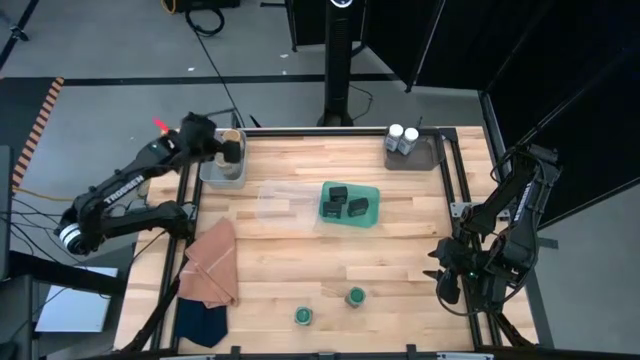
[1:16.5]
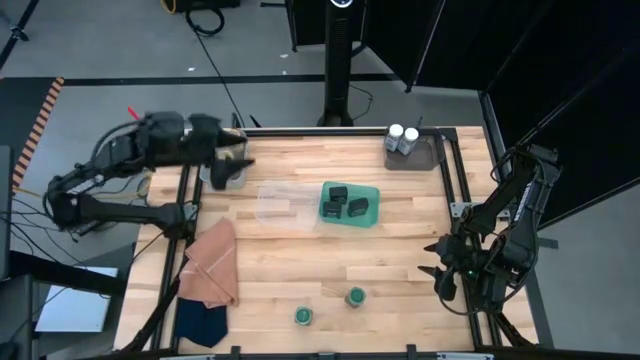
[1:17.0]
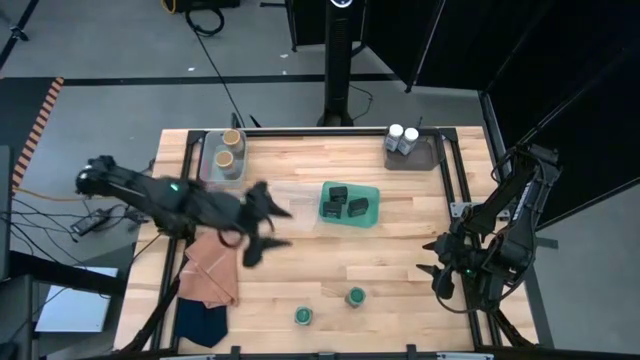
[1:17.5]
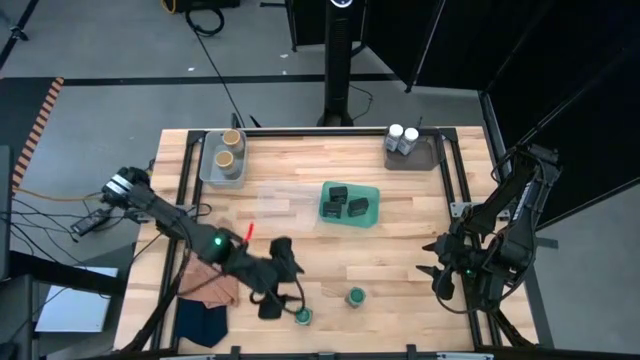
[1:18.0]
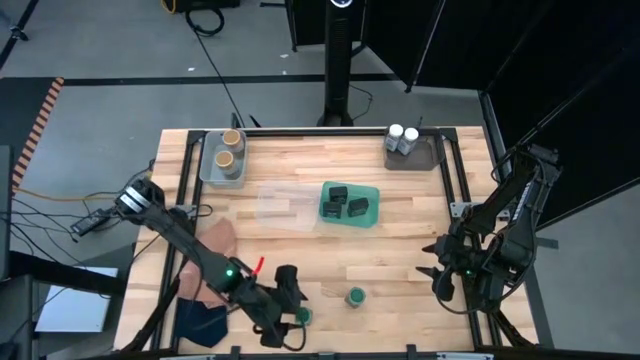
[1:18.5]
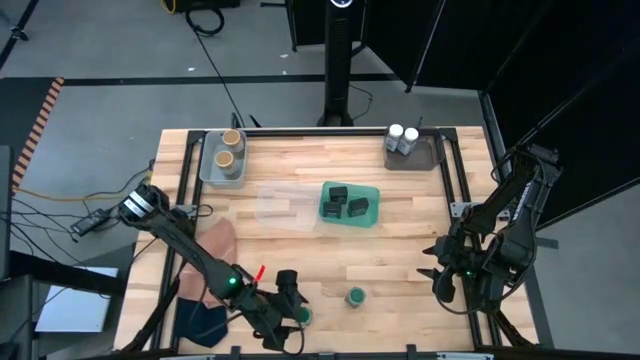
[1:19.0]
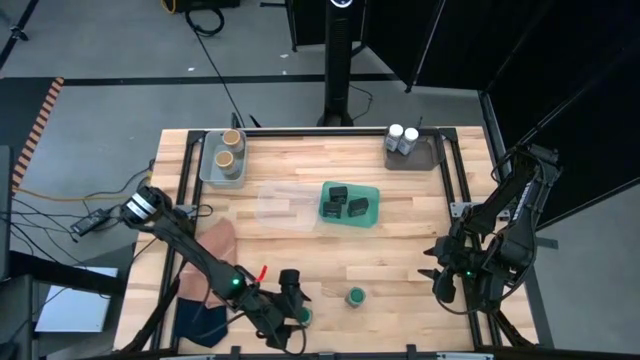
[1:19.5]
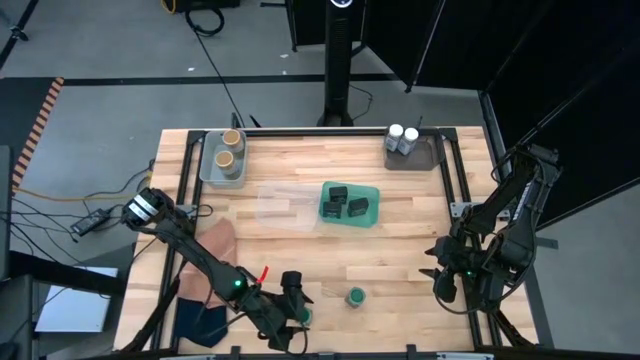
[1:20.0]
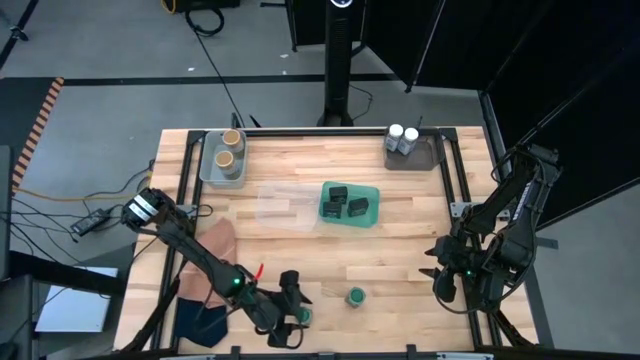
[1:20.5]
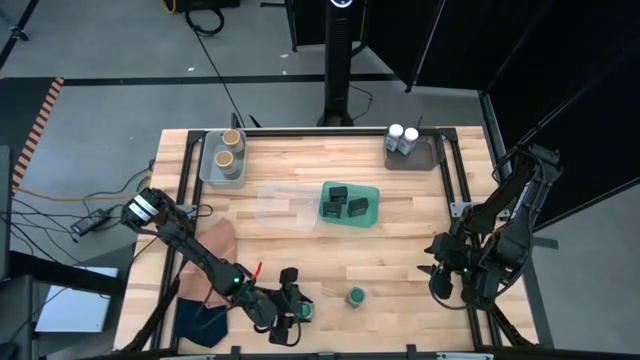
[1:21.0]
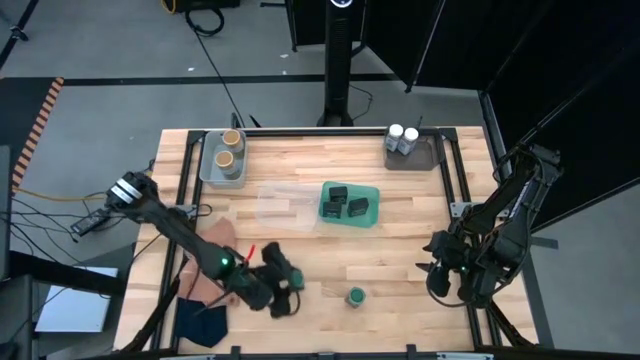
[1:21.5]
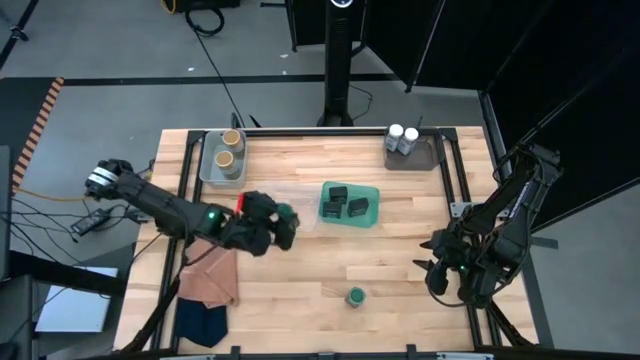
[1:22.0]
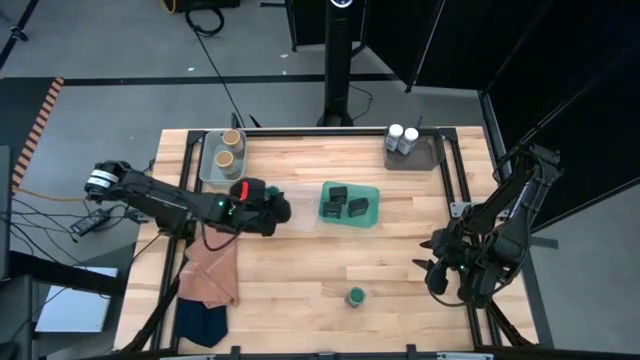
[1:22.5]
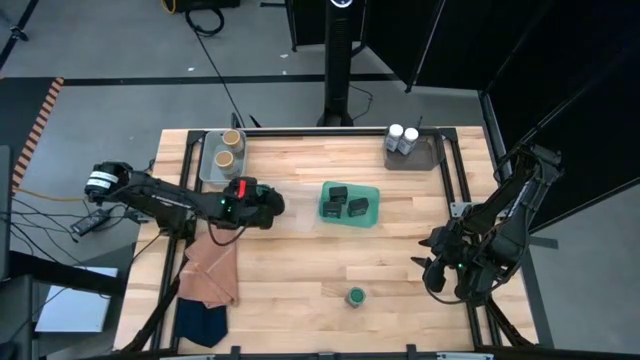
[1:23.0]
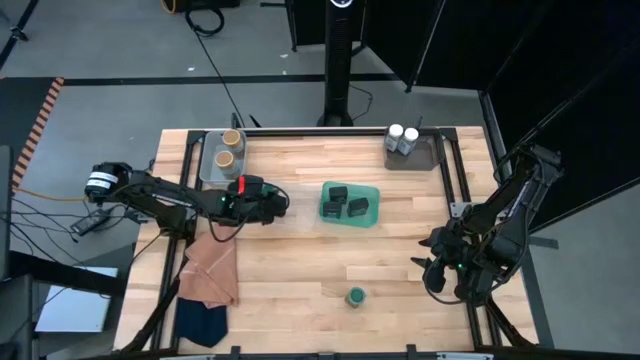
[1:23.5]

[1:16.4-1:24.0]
Task: Sort spices by type
Put the left green seasoning bottle into the transparent bin

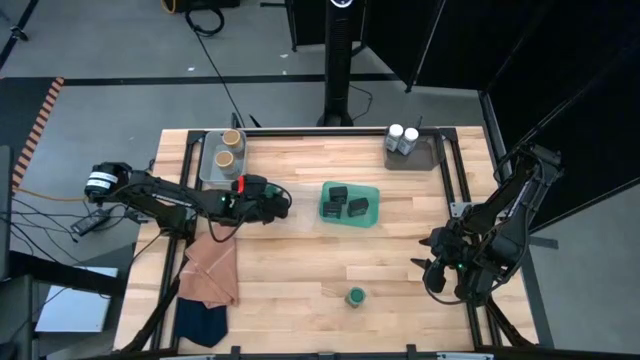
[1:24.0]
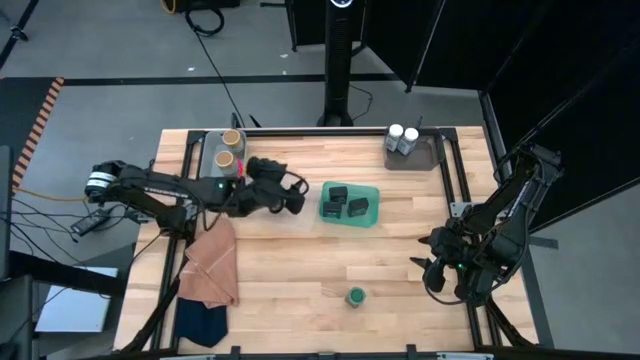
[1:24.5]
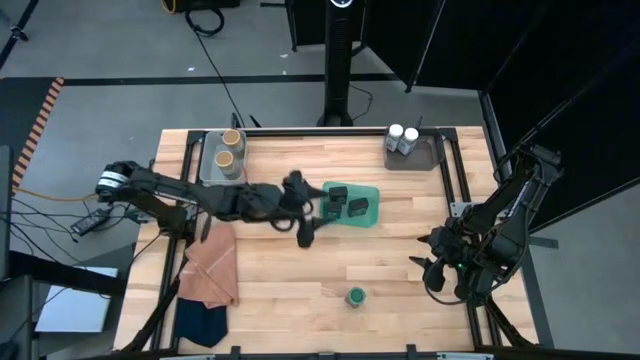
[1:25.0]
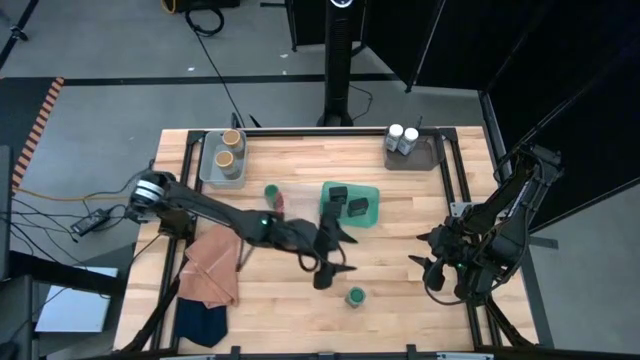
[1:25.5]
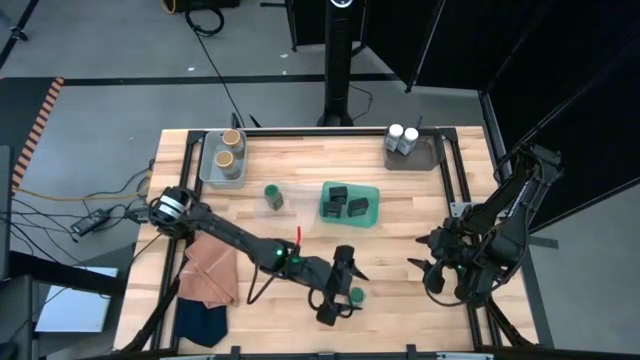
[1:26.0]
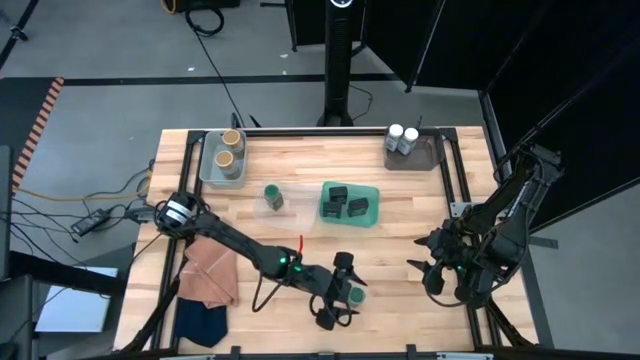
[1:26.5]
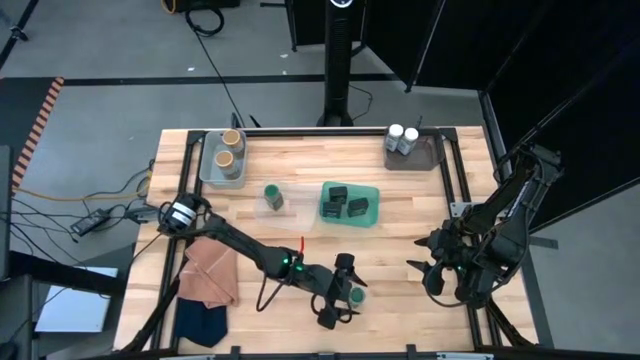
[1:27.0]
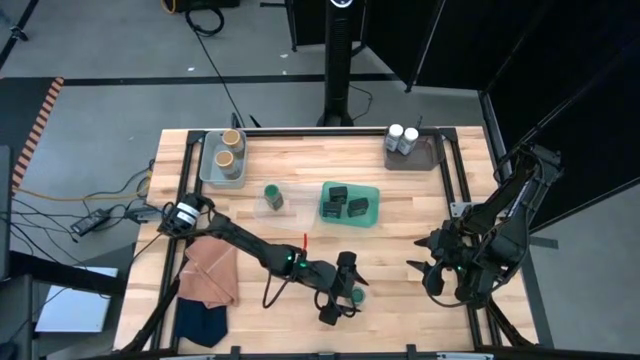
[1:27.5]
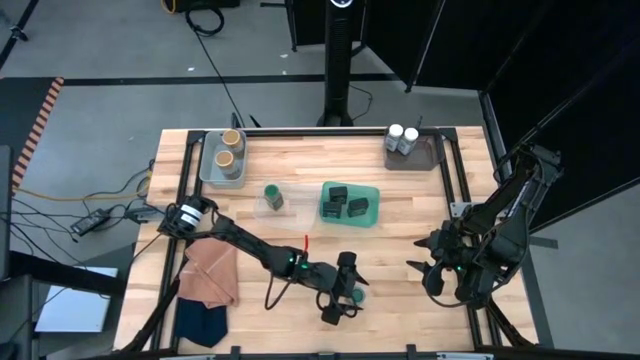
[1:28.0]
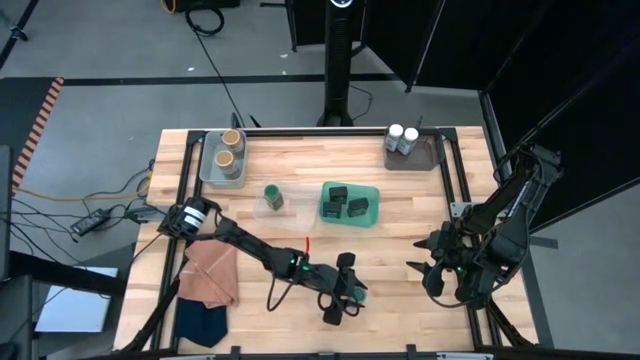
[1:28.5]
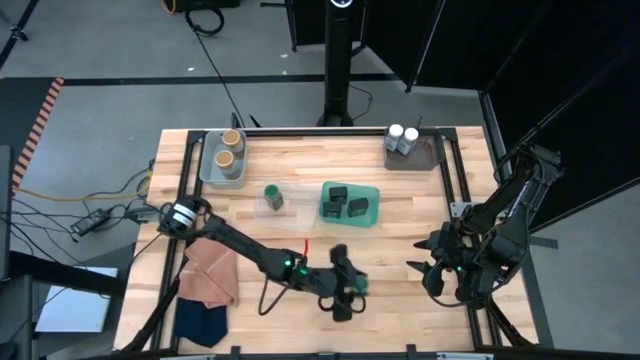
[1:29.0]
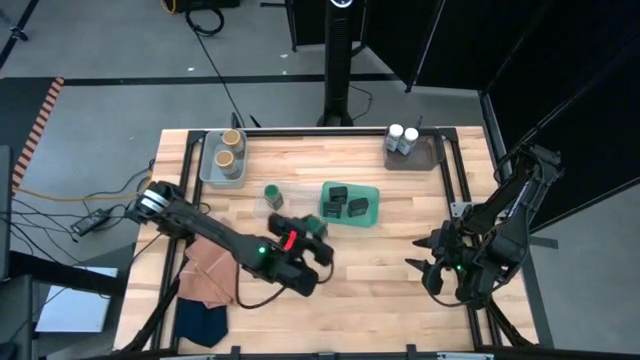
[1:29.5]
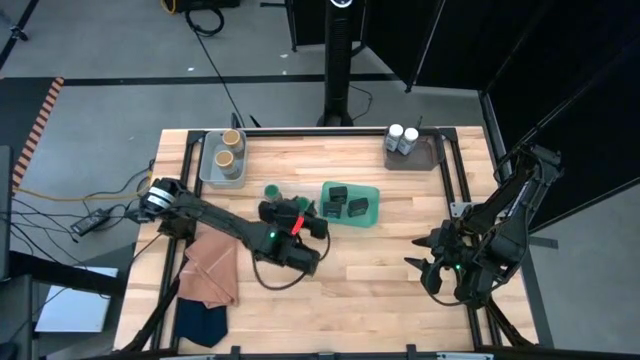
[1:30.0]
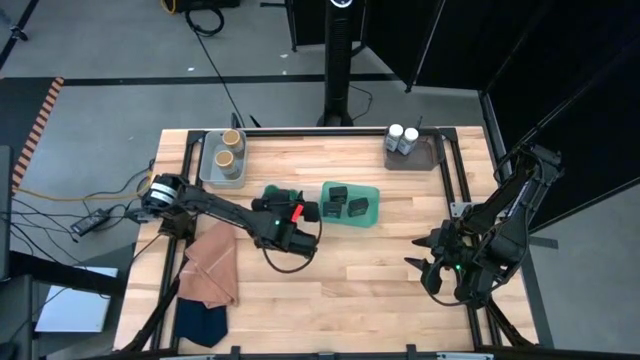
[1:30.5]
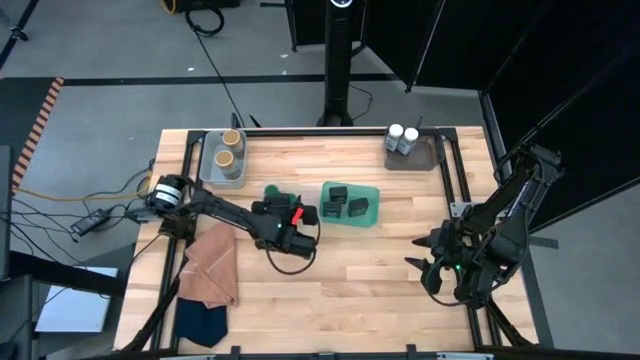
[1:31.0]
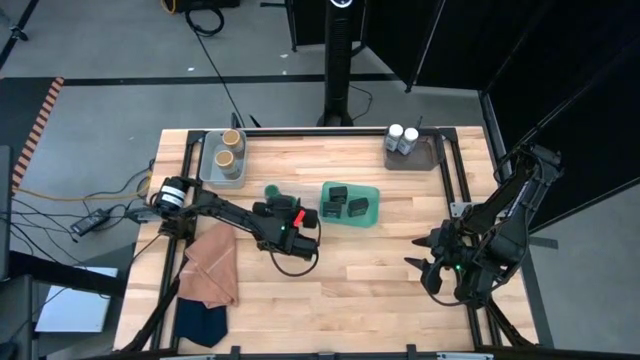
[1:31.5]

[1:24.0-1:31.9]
Put the green seasoning bottle into the transparent bin

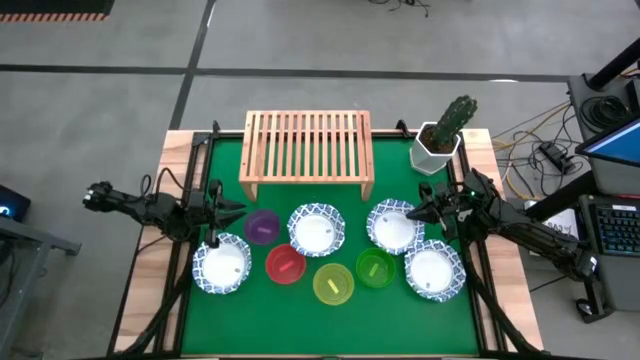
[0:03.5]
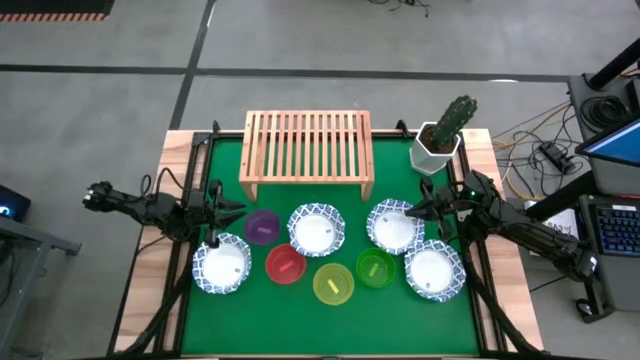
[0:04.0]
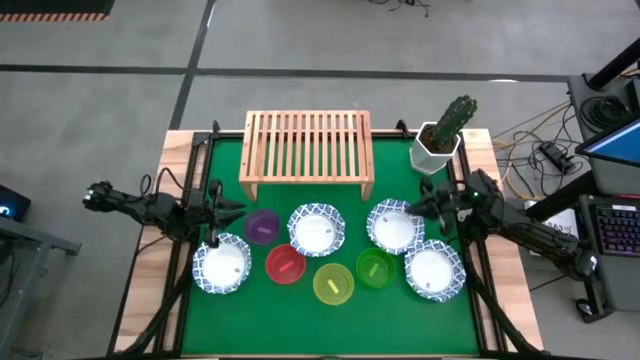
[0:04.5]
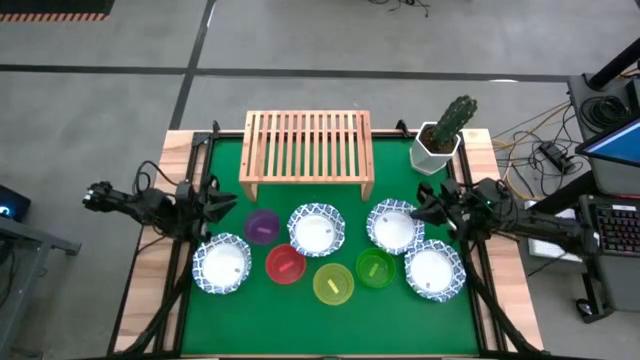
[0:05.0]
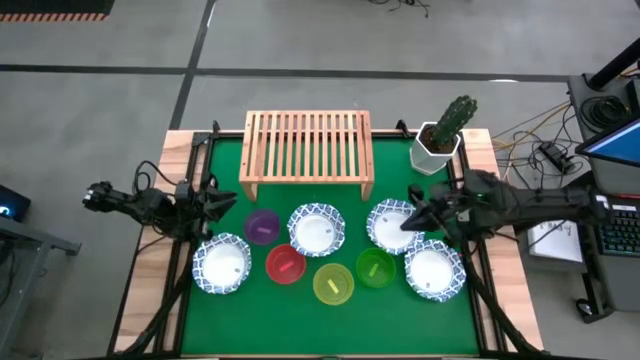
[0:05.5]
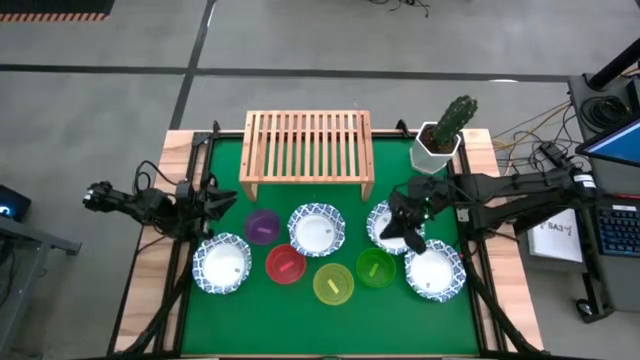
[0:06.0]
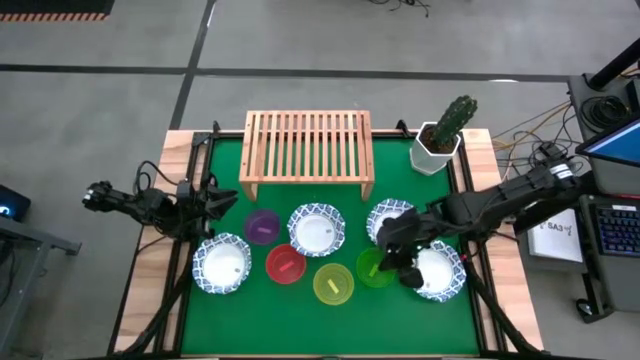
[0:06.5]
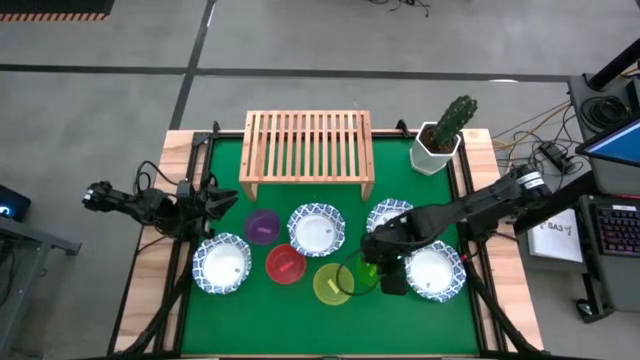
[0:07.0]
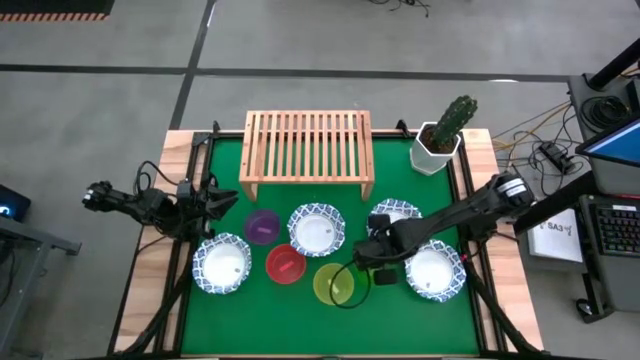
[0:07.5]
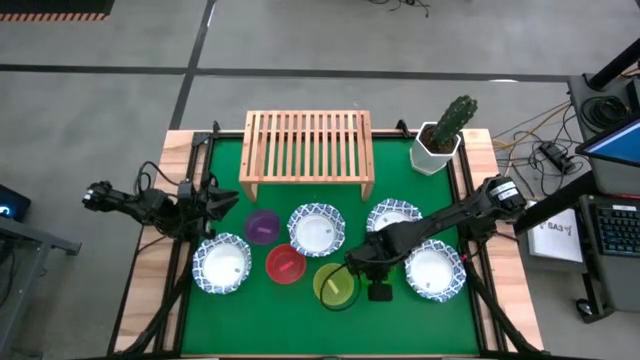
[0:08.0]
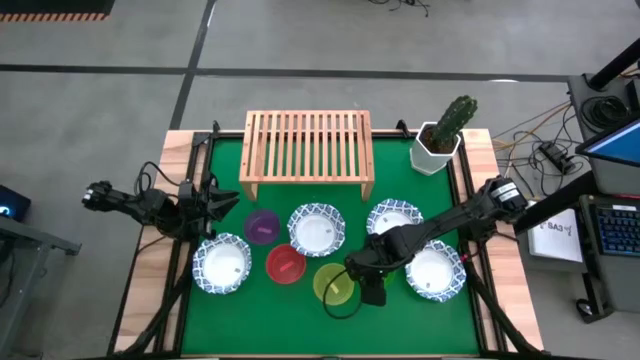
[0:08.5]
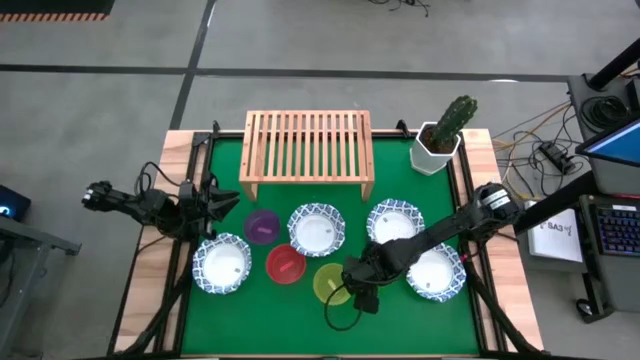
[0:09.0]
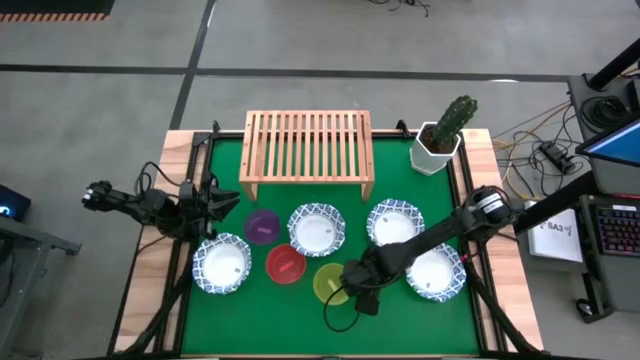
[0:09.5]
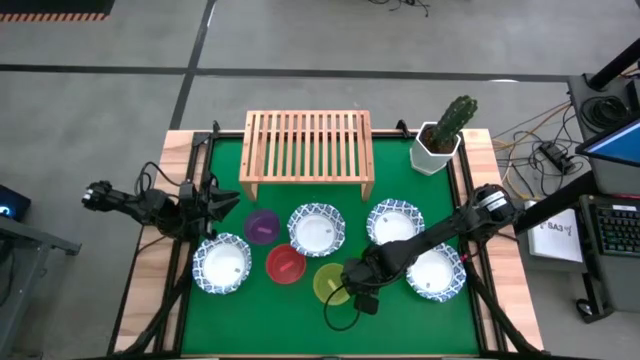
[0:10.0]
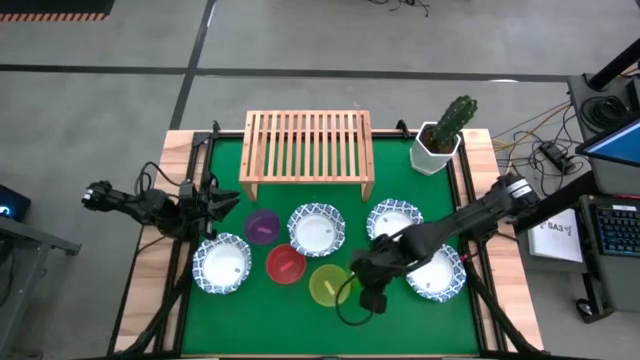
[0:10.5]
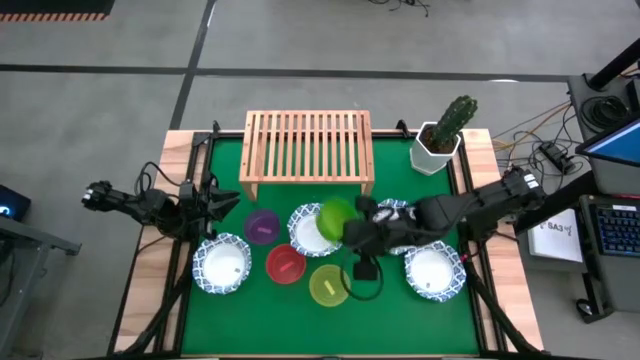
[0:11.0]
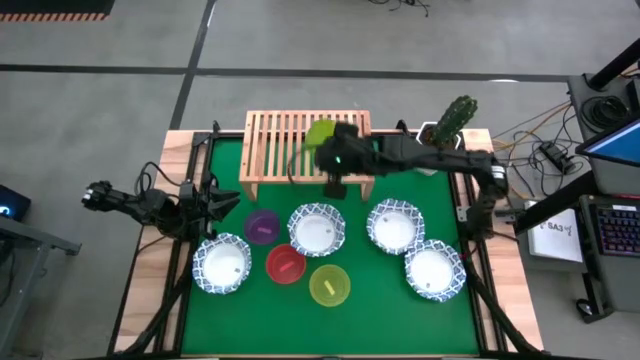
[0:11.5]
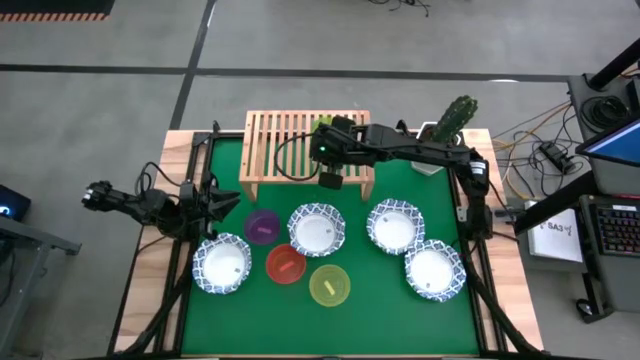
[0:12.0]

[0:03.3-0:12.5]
Task: Place and stack bowls onto a shelf
Put the small green bowl on the shelf
